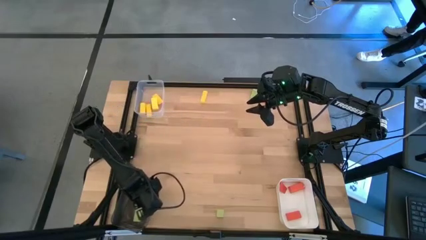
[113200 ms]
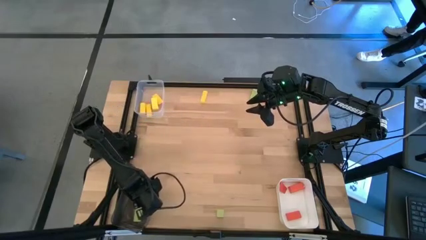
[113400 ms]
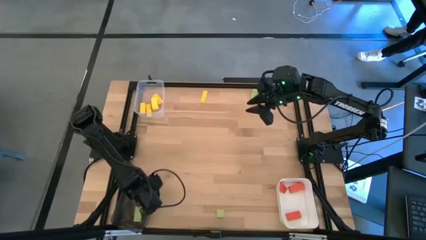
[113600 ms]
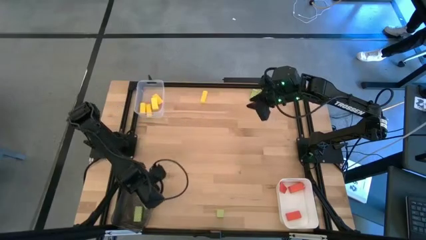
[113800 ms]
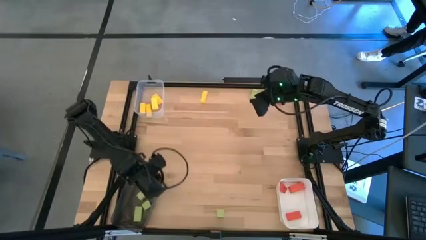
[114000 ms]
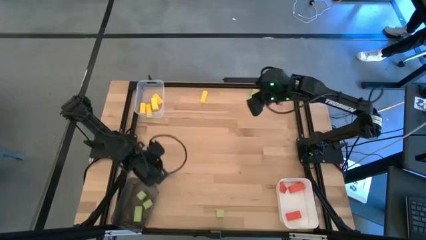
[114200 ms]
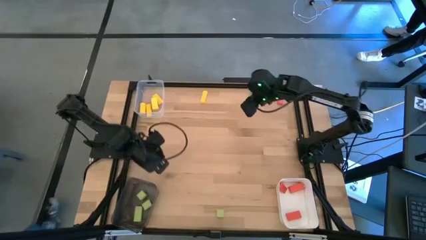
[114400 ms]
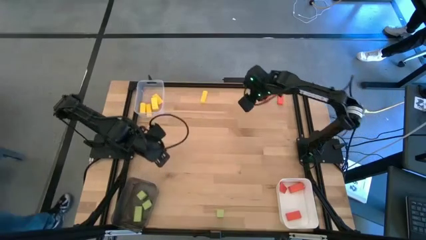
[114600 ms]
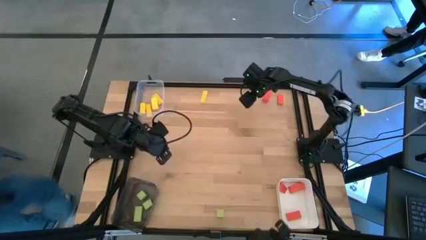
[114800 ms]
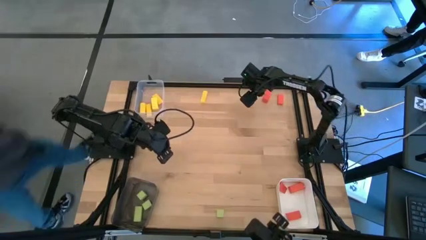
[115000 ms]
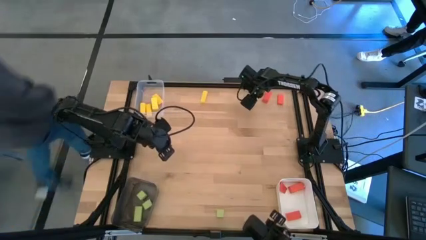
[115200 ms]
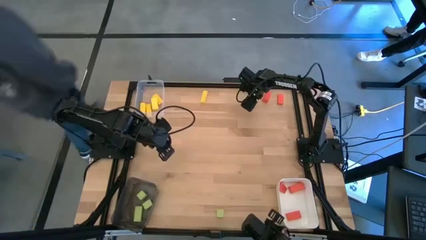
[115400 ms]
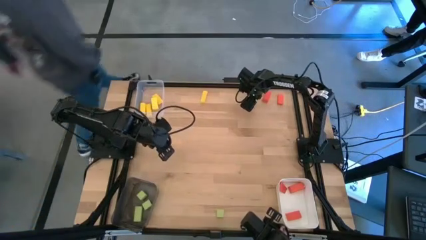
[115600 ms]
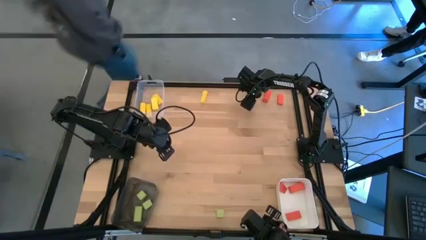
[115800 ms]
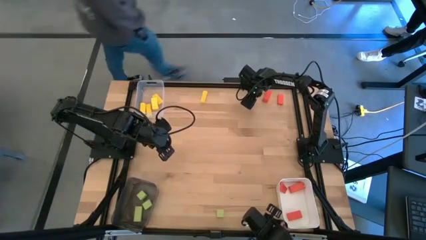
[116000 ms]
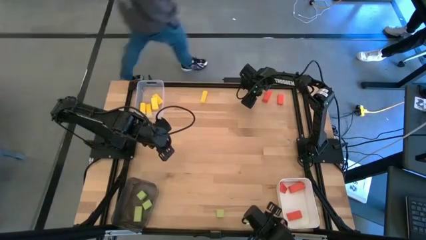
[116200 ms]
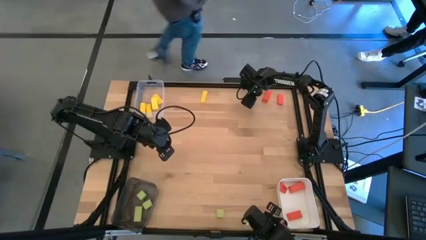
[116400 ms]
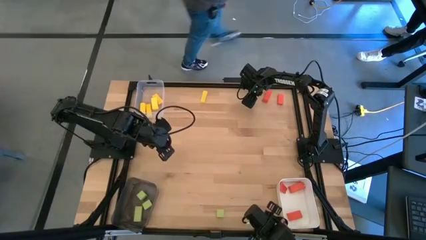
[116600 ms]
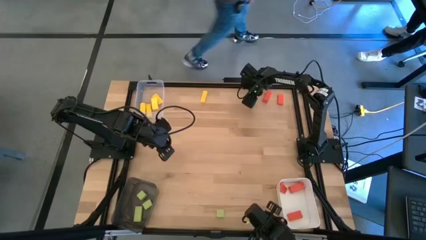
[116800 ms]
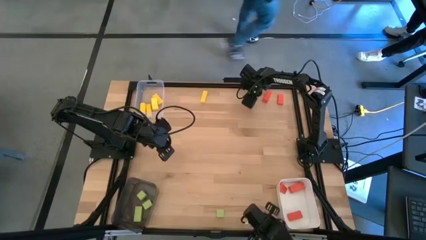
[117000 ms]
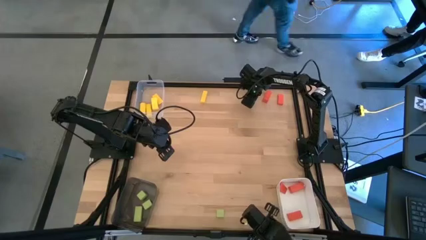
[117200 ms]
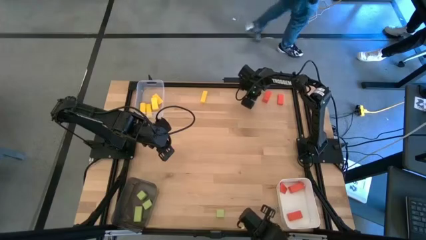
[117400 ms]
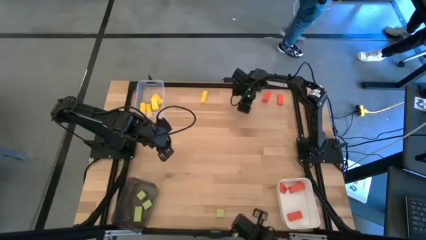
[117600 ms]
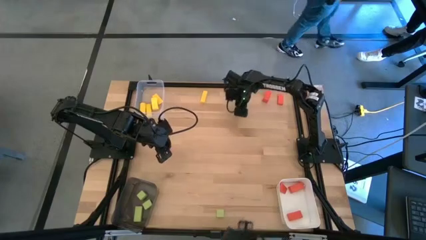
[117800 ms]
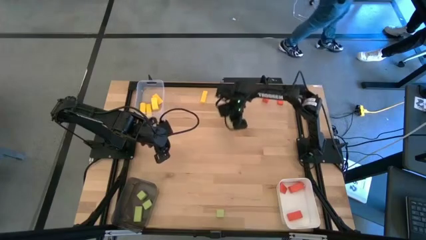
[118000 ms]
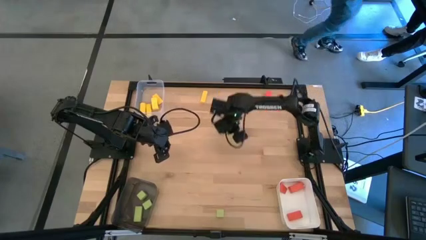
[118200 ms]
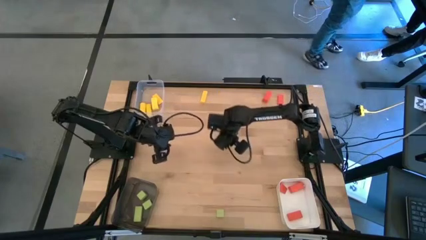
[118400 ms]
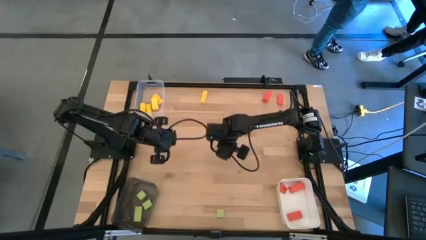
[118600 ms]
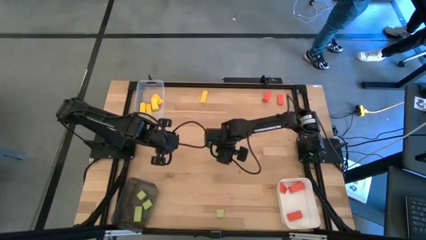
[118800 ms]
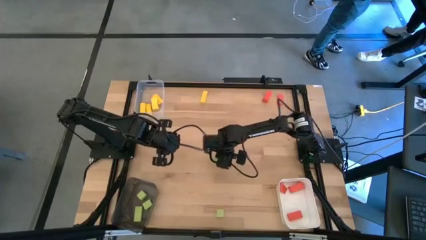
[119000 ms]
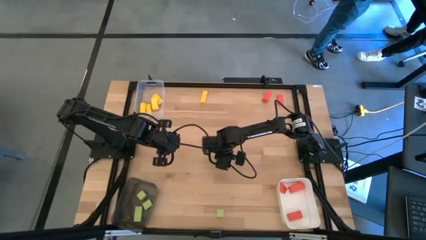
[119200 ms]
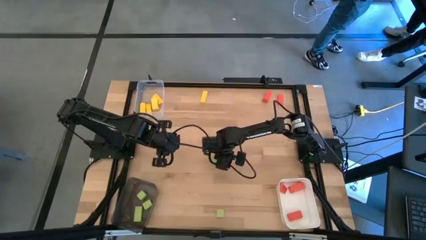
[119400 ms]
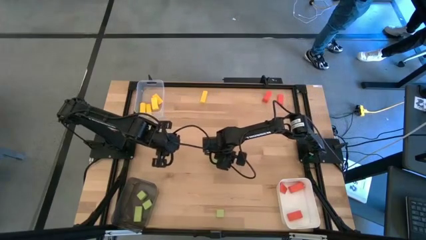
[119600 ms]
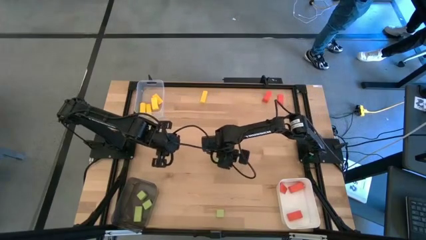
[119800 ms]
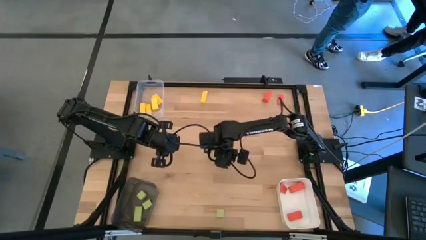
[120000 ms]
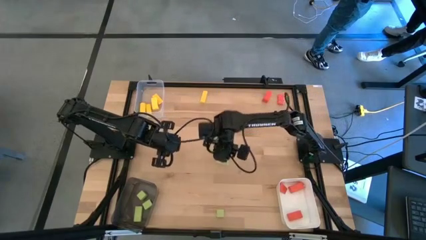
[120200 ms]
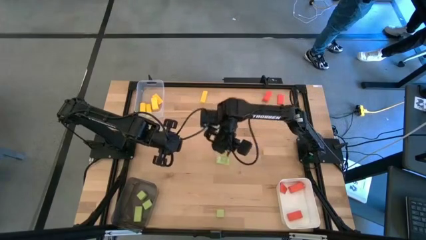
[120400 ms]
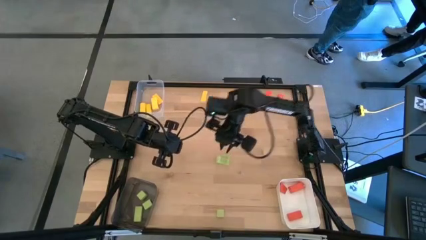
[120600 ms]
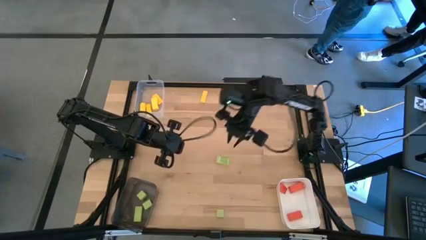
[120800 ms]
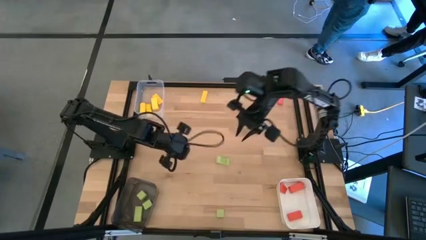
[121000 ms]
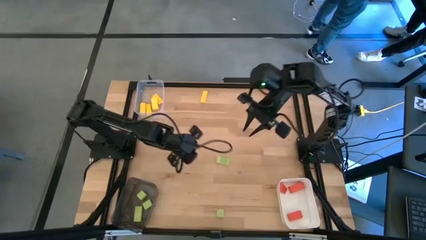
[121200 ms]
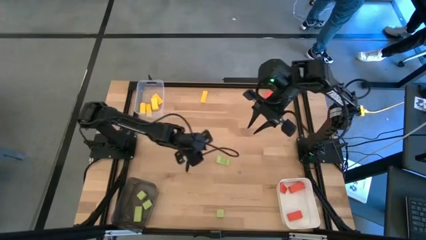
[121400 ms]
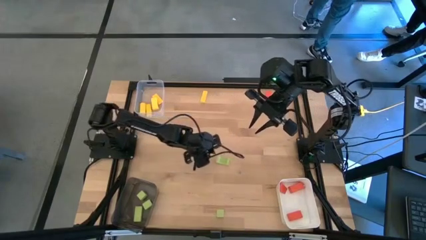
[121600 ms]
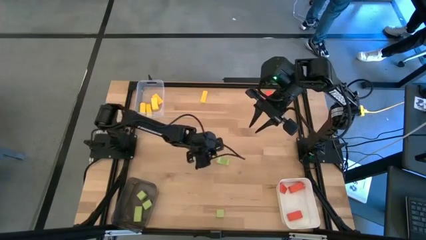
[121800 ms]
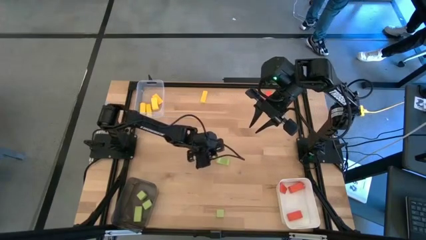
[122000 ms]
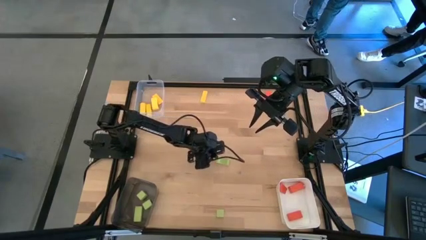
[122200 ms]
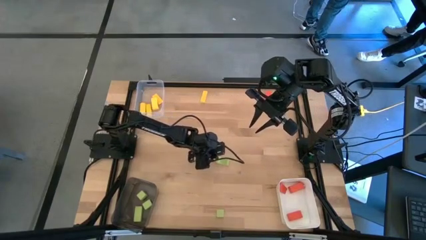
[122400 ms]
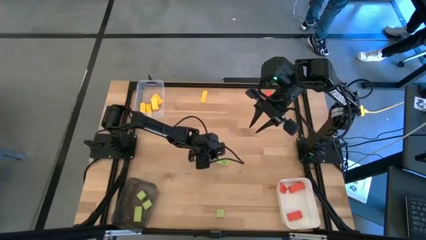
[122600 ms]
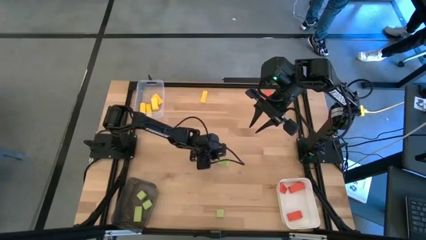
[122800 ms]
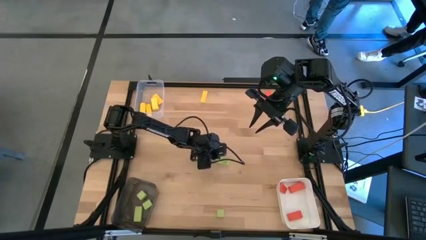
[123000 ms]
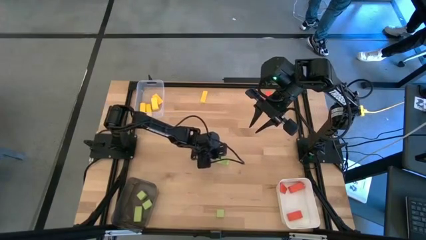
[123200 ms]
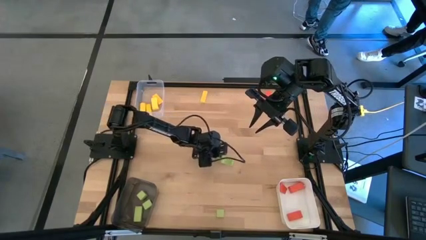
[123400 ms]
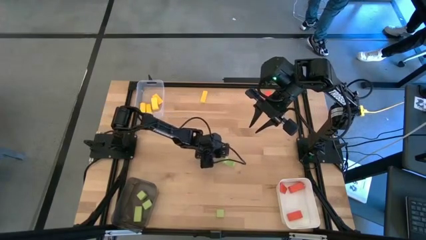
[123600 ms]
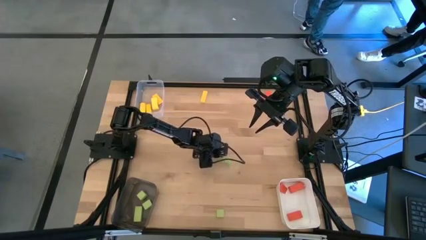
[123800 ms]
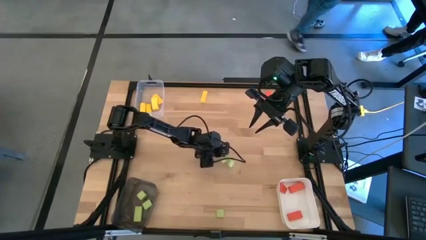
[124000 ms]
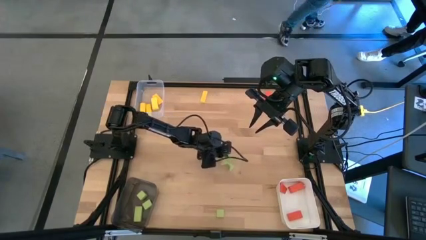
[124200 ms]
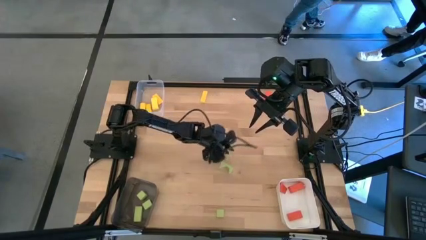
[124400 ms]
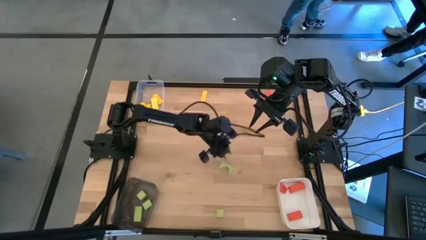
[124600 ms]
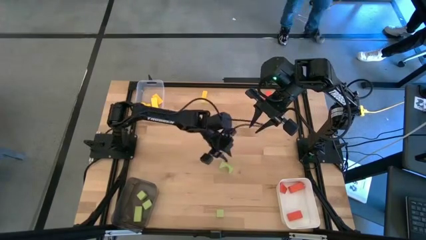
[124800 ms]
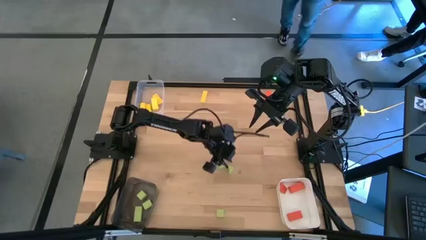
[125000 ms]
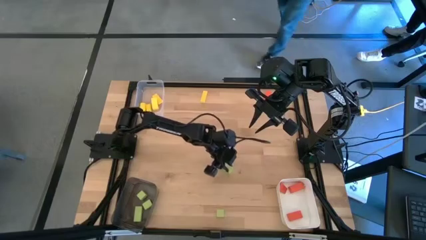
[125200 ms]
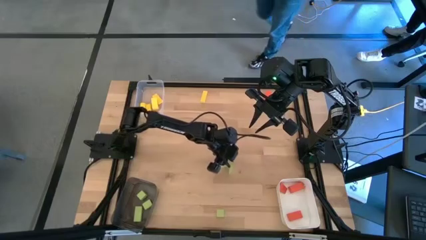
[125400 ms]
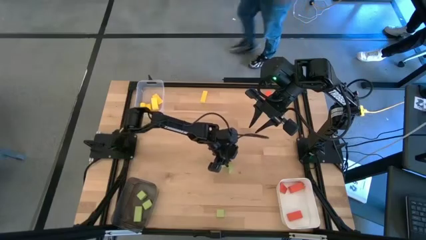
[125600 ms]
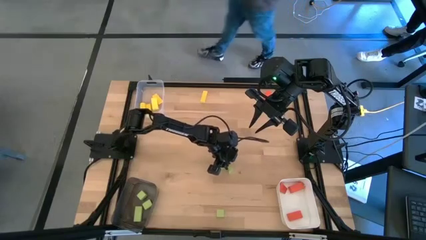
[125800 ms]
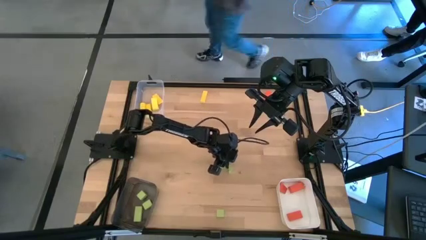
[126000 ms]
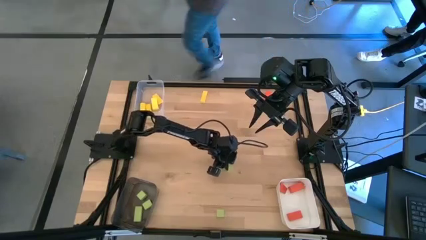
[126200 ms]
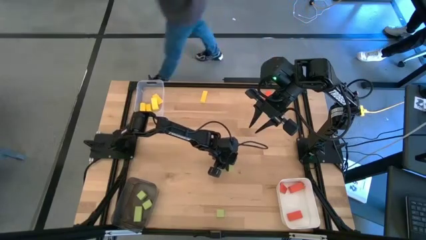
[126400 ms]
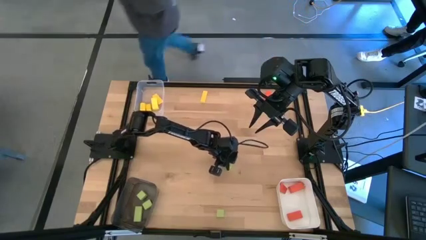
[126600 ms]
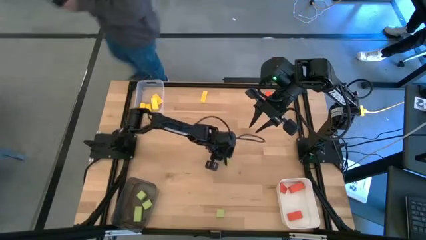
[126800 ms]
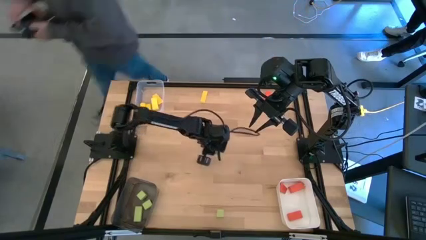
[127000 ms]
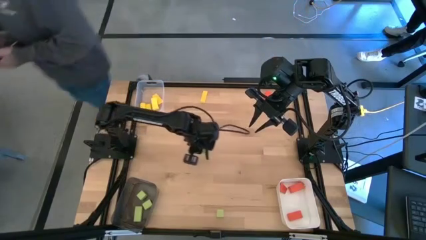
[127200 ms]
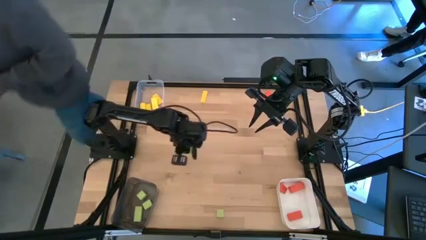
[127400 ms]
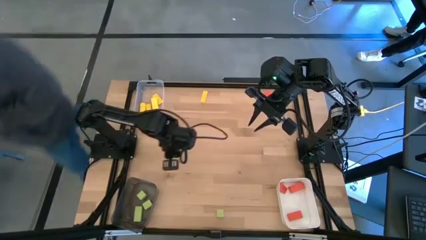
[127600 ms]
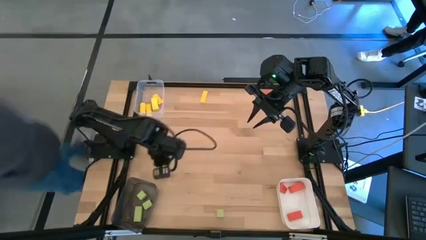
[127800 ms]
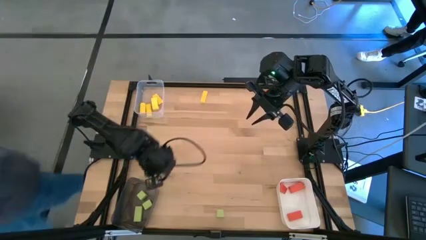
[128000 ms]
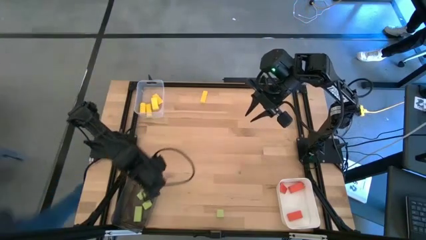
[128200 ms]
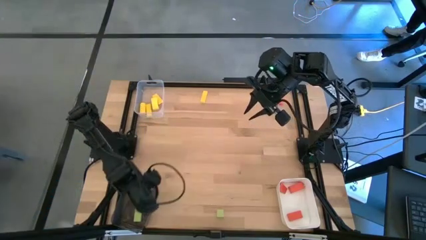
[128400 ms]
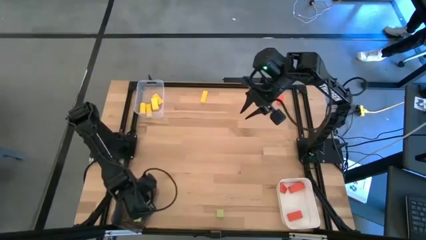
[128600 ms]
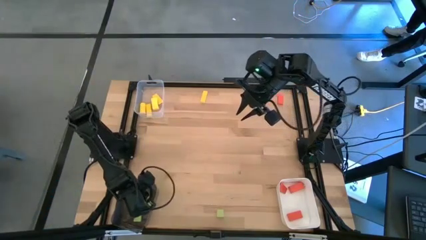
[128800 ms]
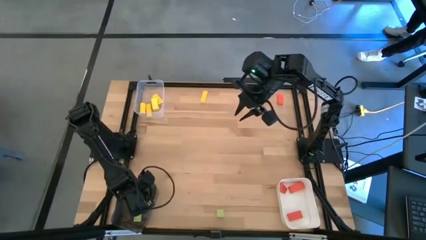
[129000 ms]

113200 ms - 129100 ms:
Task: Sort & place blocks by color
Put the green block into the black bin
